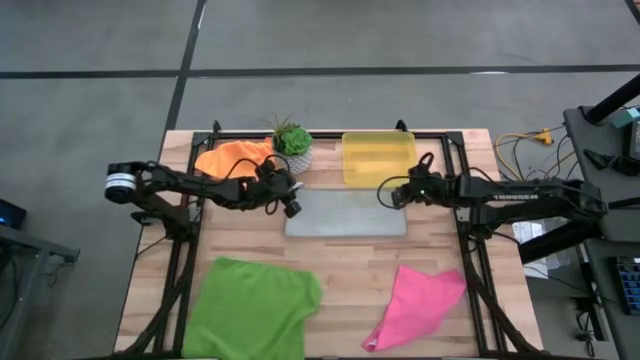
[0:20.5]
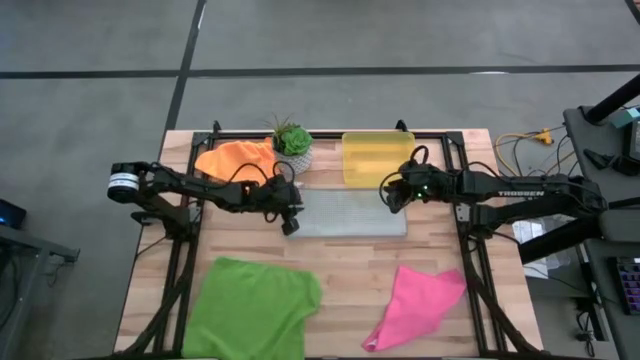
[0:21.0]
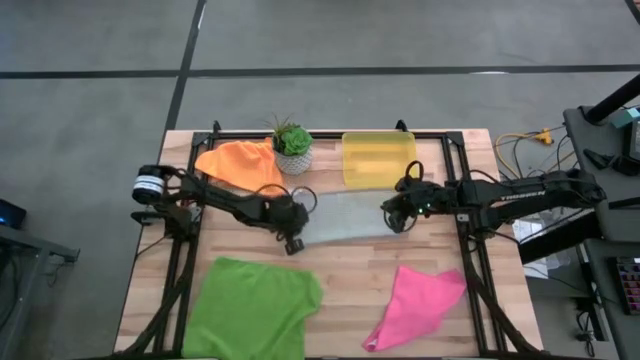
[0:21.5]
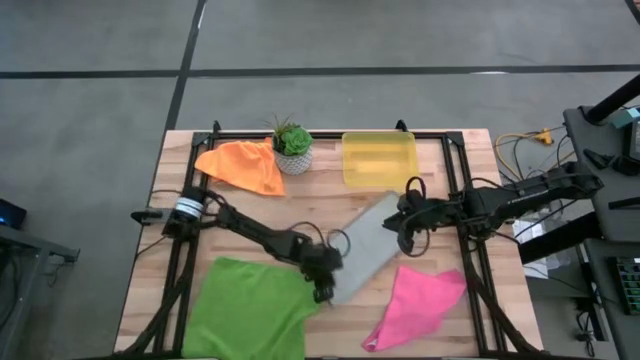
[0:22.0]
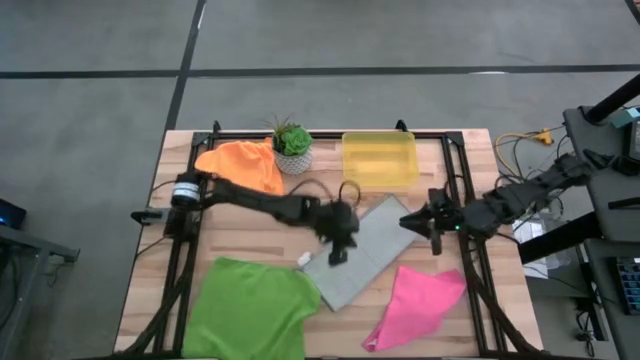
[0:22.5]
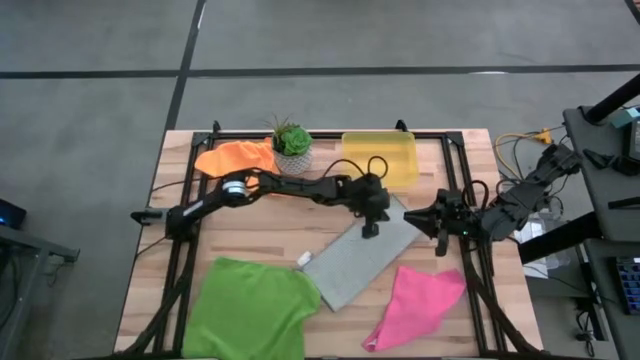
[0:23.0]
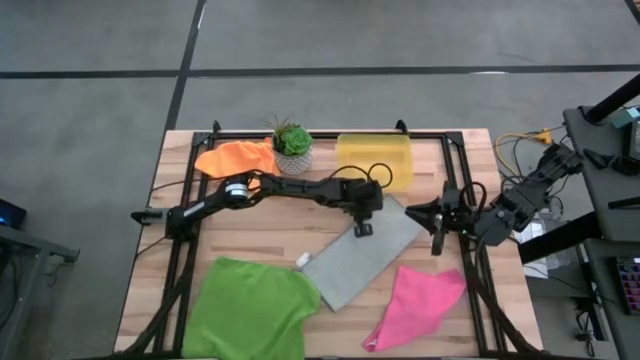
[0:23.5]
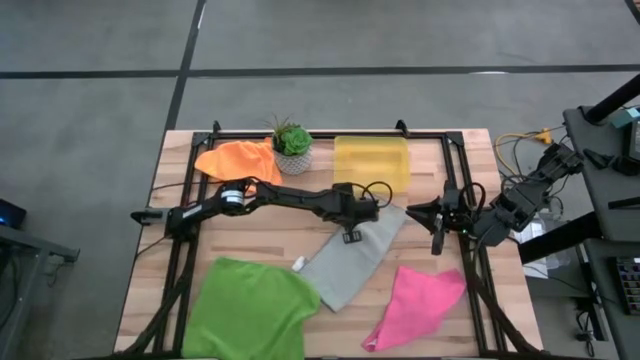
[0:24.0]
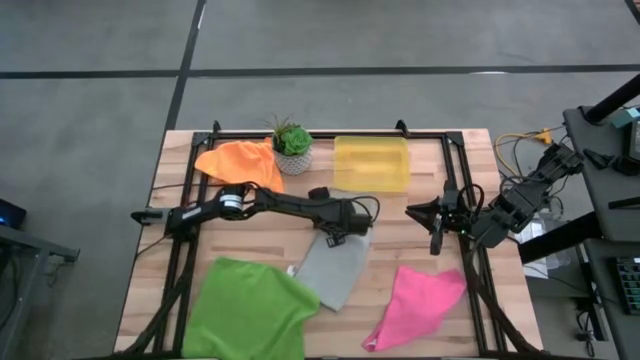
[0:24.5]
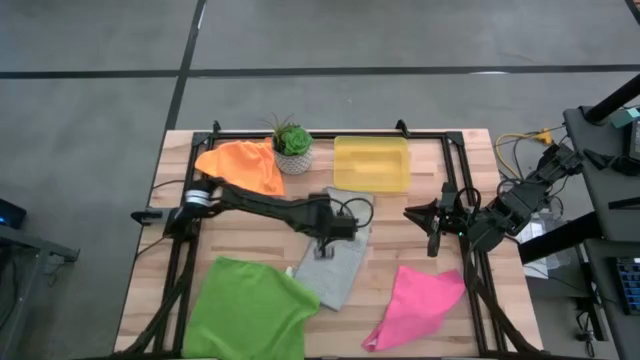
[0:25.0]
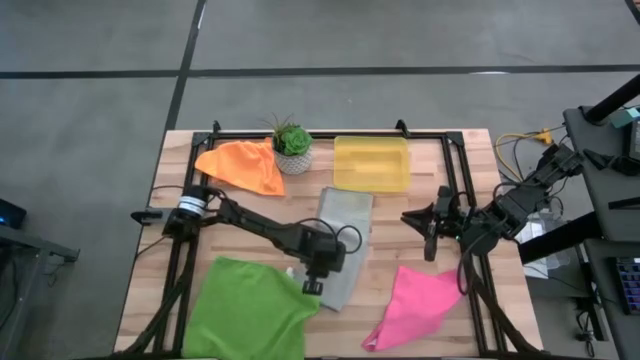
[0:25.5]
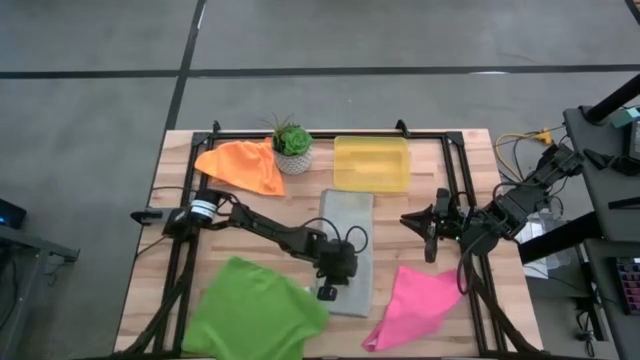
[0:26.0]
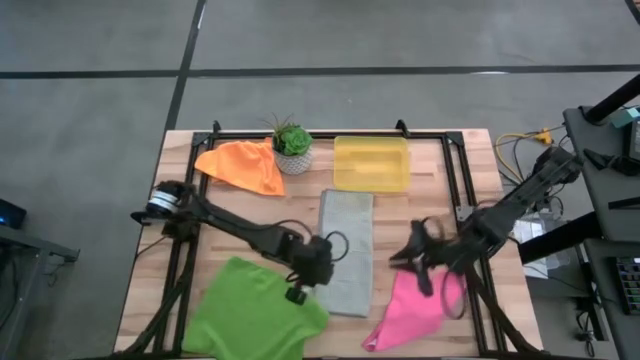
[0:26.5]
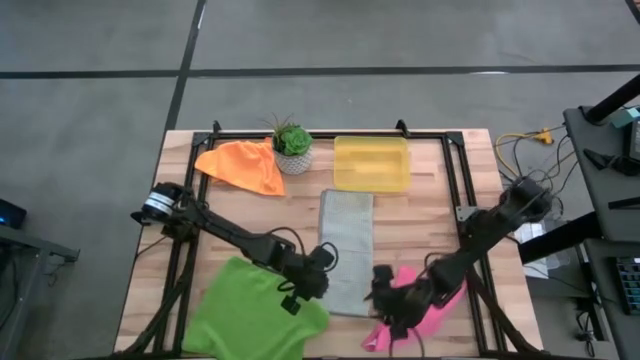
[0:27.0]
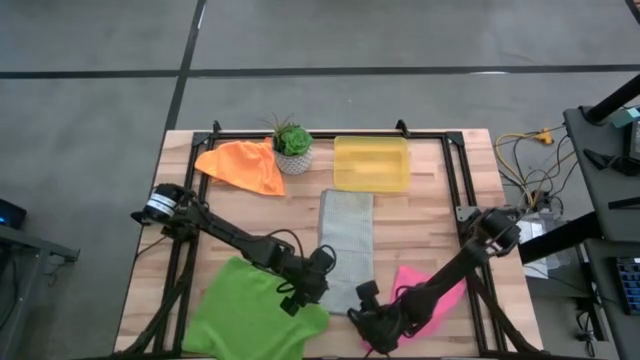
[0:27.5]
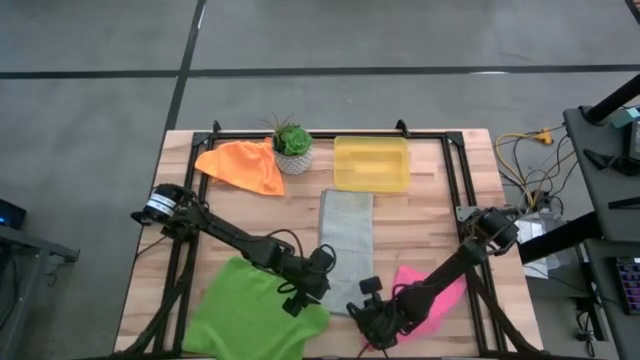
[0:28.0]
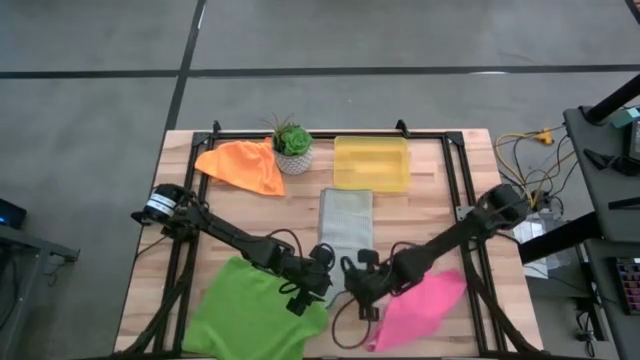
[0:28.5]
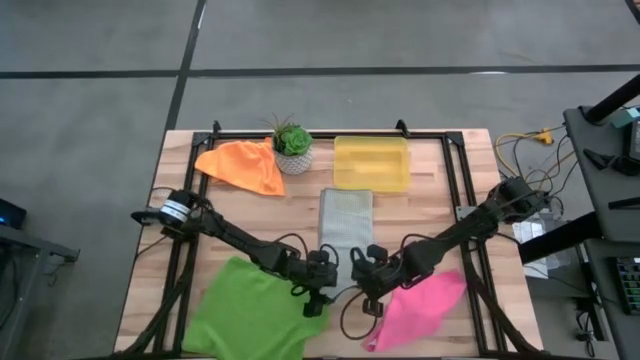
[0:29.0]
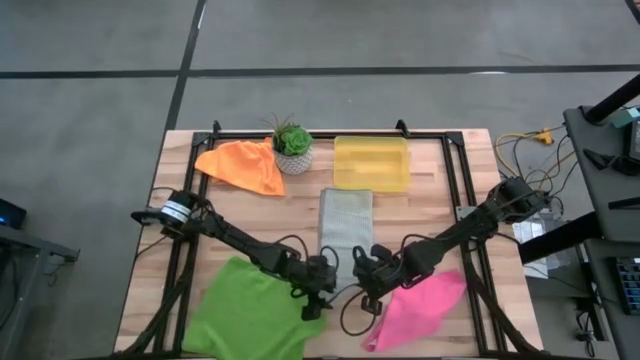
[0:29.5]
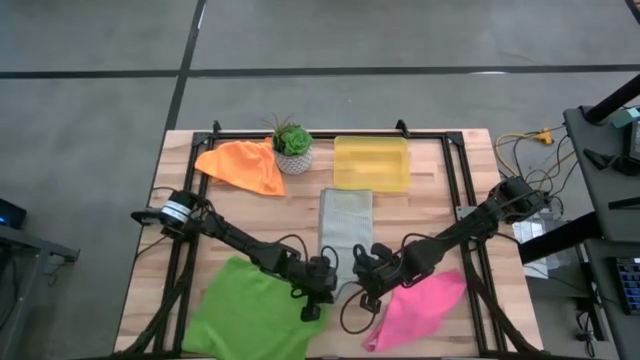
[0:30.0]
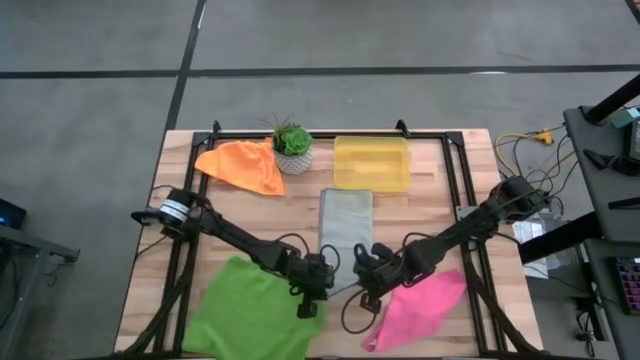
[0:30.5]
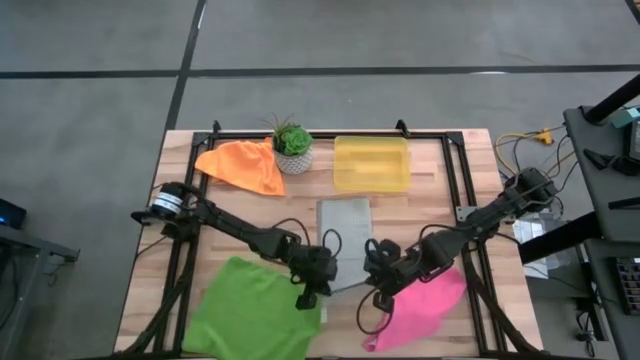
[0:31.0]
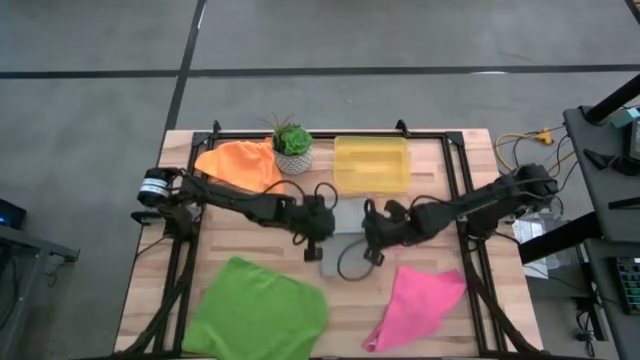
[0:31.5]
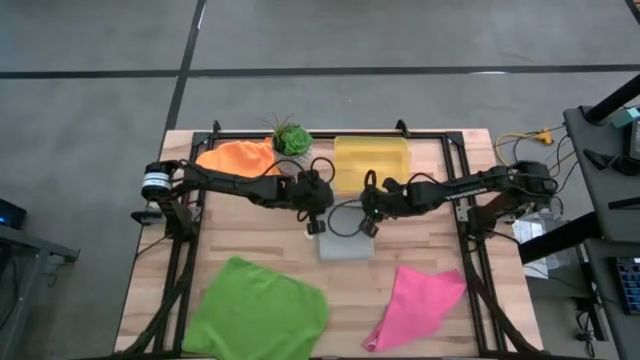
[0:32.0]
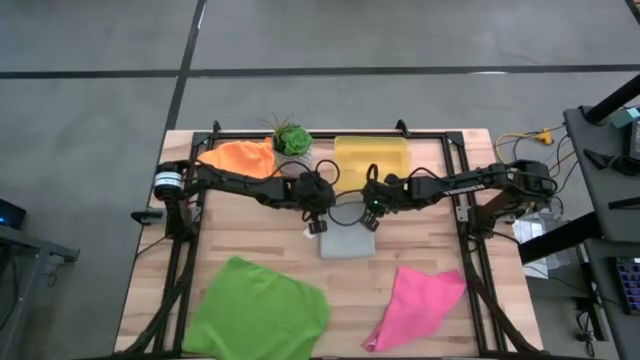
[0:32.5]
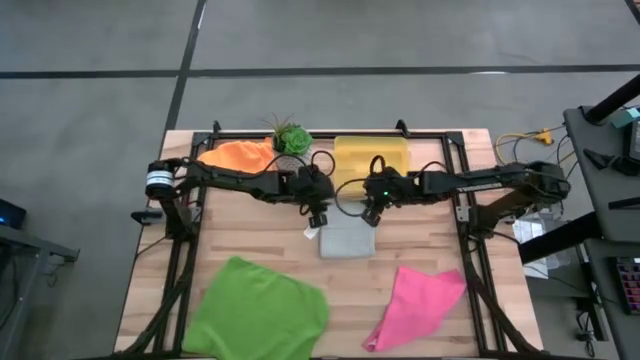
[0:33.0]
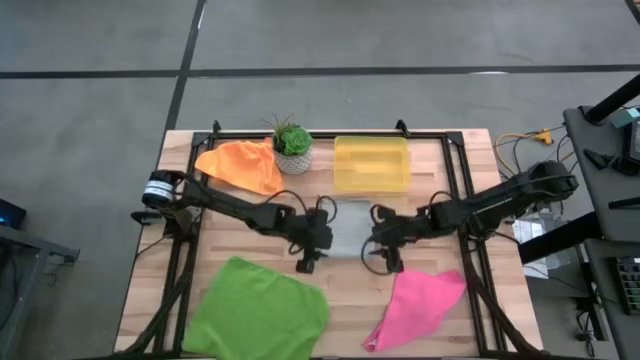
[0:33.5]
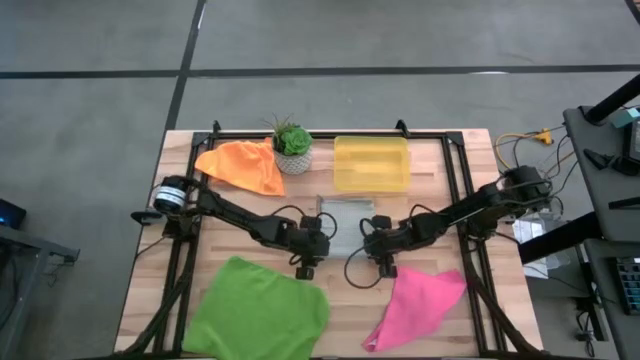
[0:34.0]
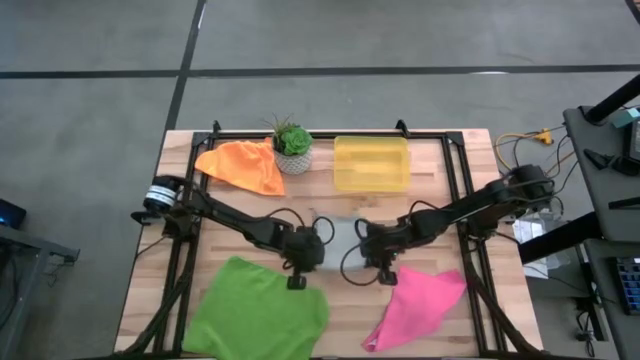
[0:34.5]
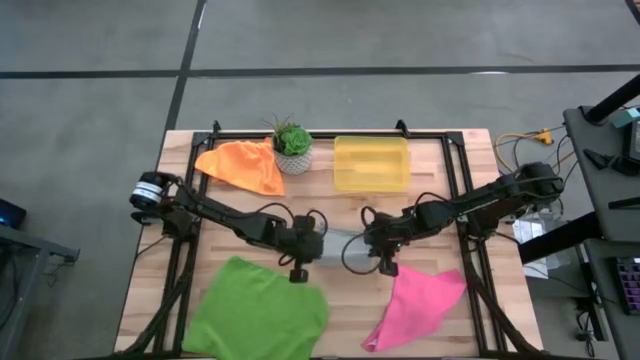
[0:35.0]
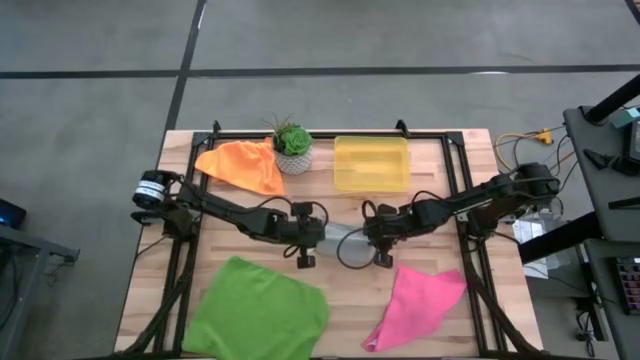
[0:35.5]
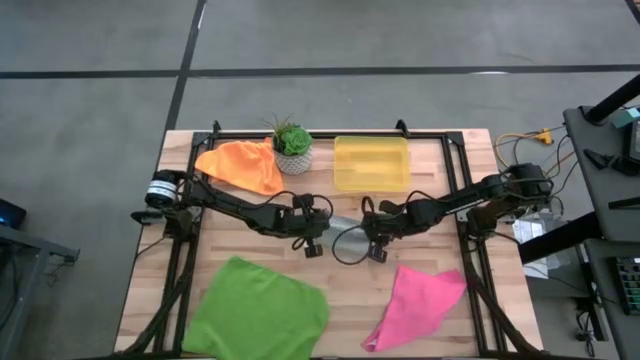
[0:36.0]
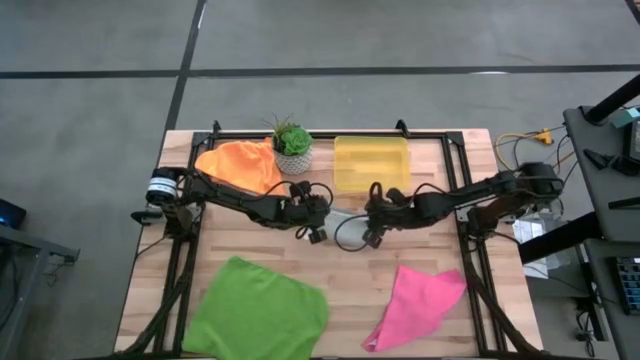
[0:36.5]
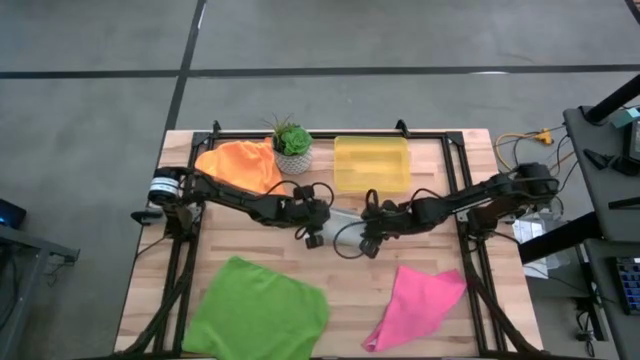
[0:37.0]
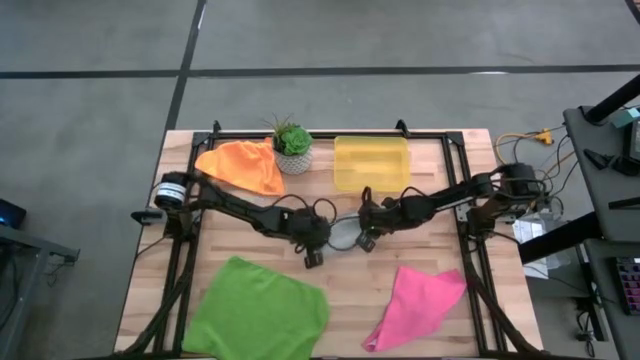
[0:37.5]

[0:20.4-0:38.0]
Task: Fold microfiber towels
Fold the gray microfiber cloth

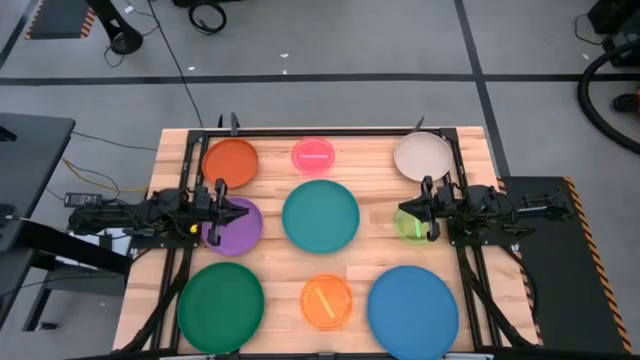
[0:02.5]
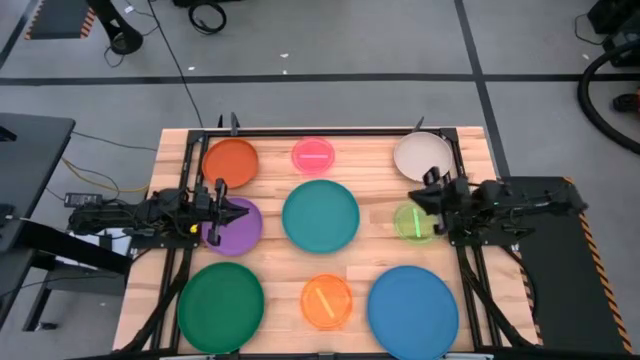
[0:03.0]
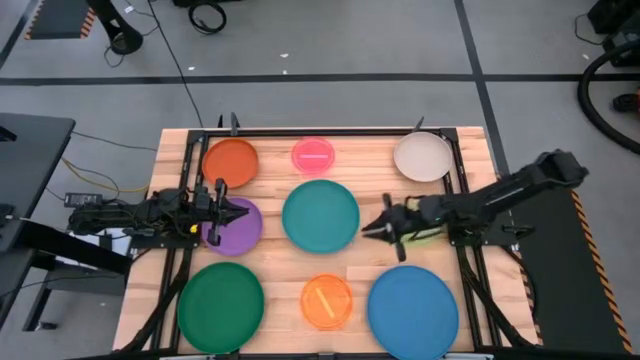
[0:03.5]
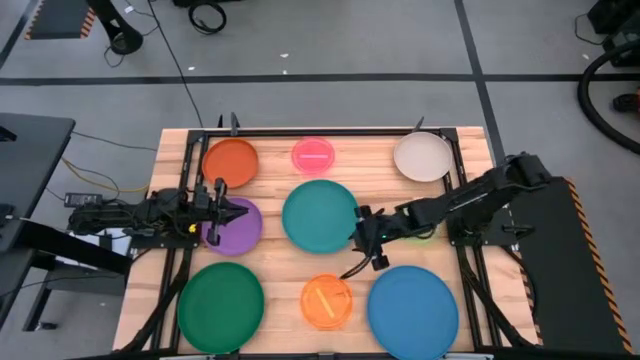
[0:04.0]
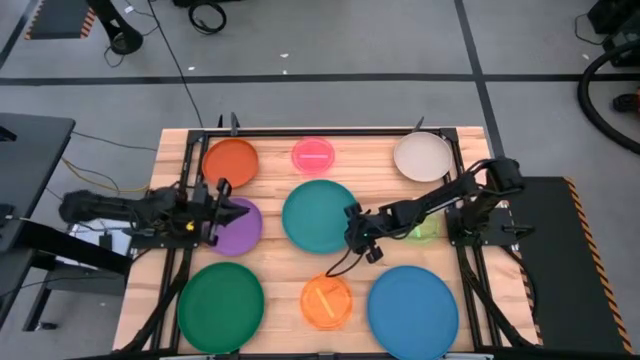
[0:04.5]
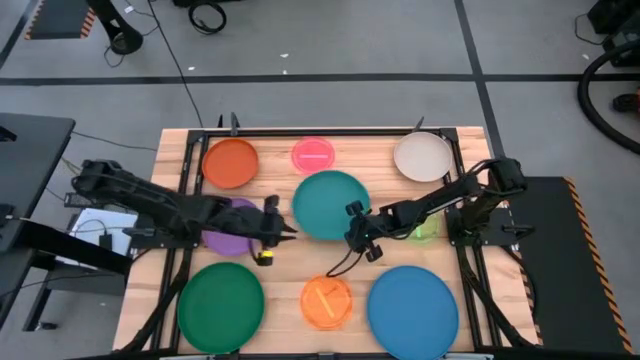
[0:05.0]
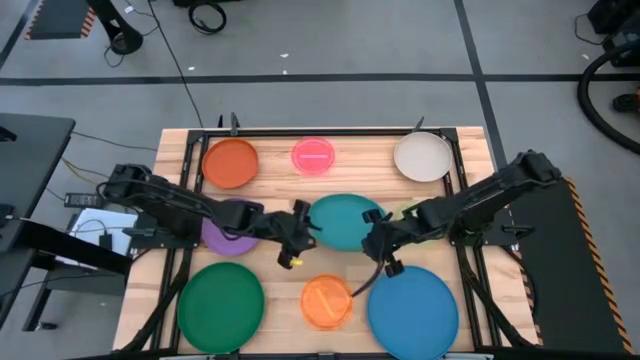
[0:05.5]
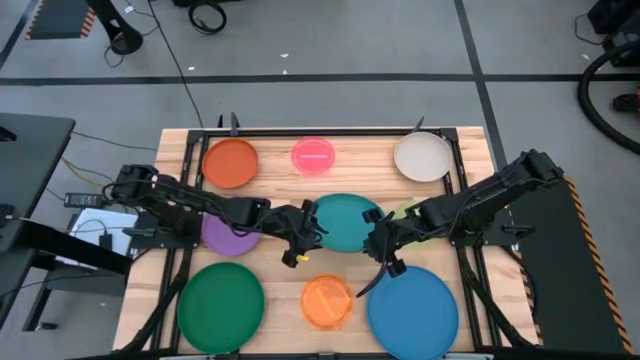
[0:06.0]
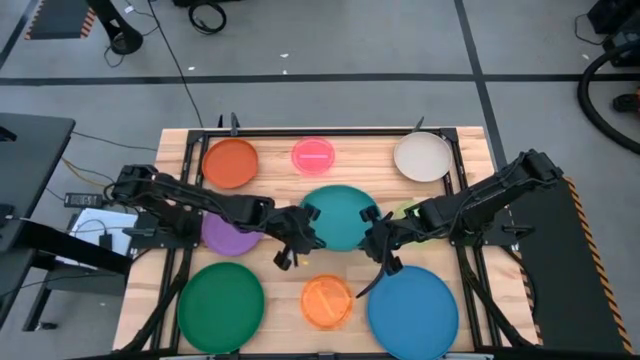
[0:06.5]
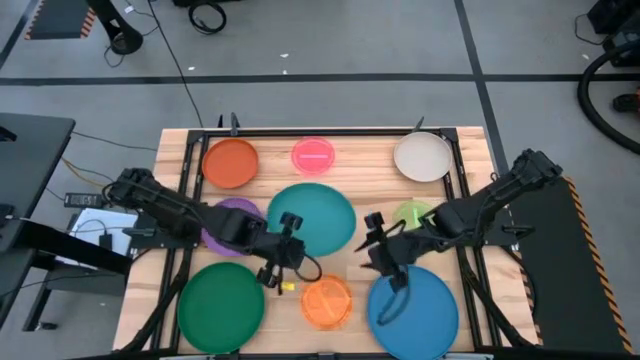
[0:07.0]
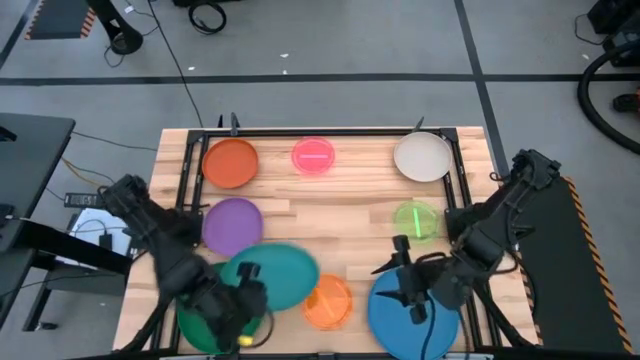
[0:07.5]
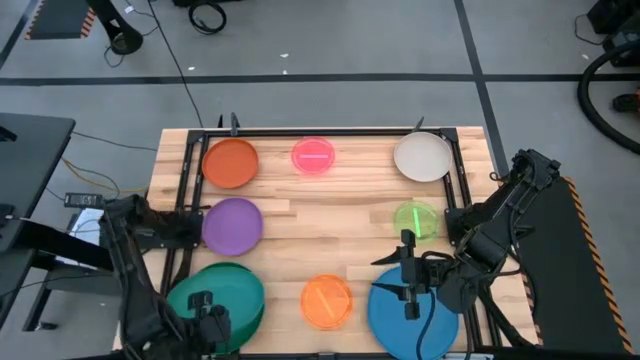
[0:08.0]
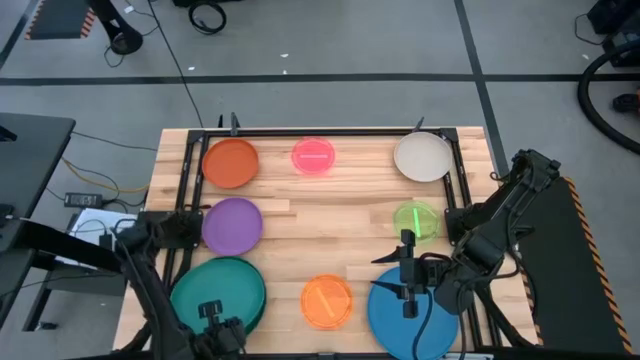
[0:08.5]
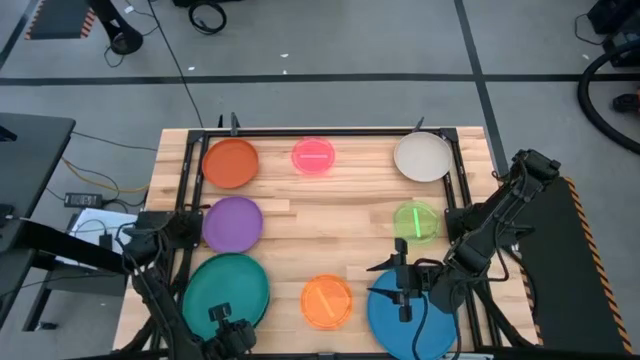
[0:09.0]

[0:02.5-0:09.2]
Task: Stack plastic plates
Stack the dark blue plate on top of the green plate
